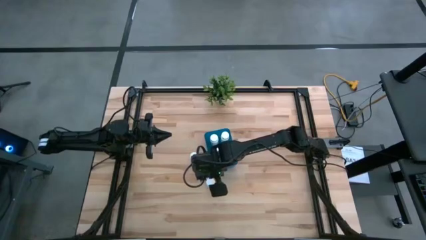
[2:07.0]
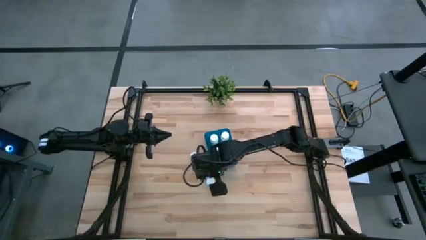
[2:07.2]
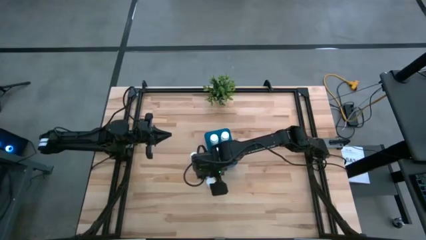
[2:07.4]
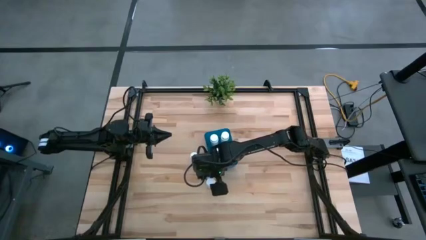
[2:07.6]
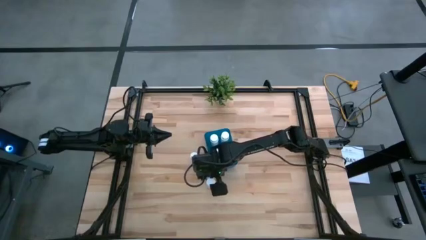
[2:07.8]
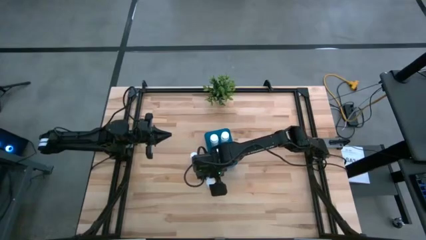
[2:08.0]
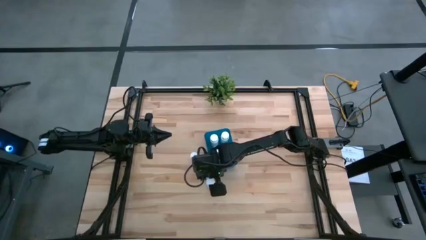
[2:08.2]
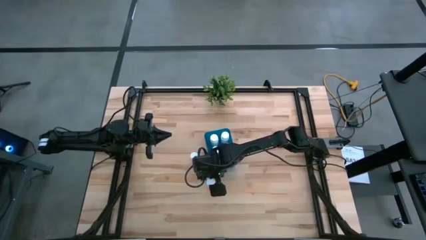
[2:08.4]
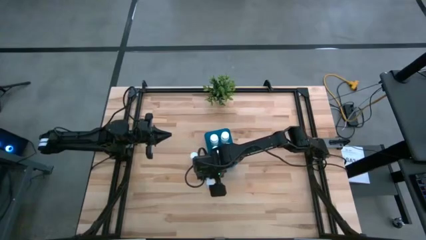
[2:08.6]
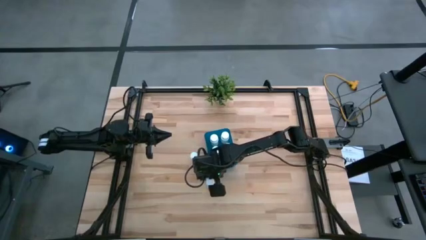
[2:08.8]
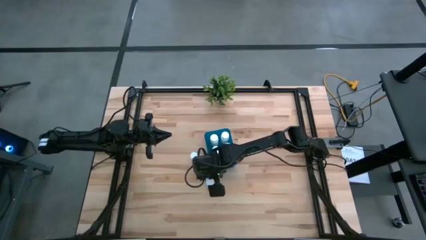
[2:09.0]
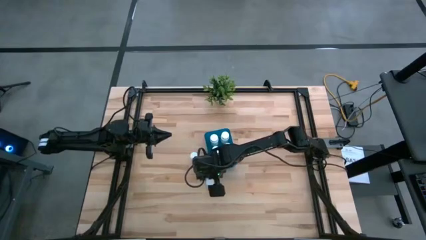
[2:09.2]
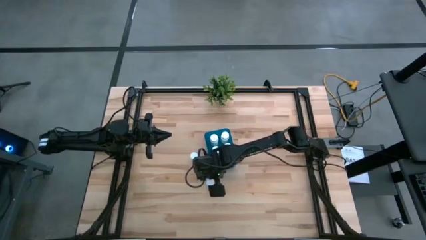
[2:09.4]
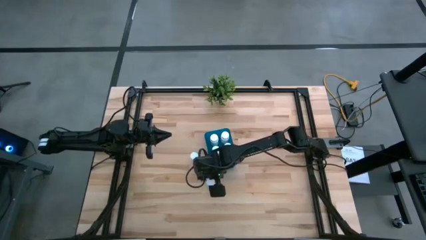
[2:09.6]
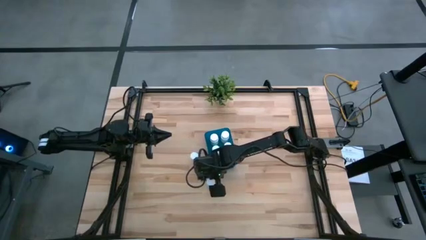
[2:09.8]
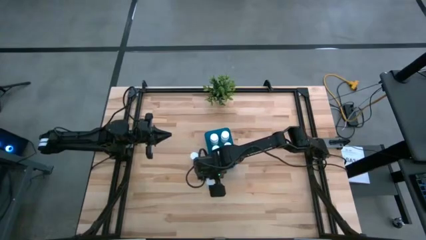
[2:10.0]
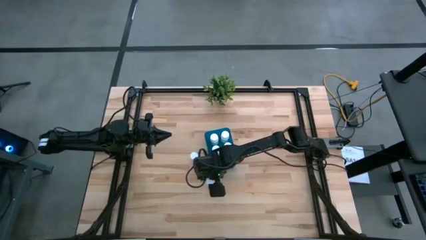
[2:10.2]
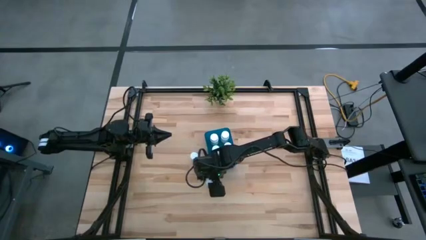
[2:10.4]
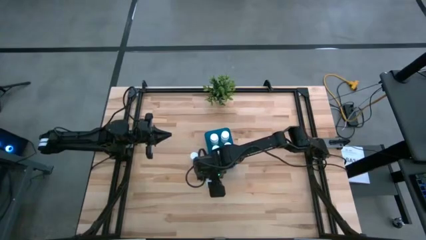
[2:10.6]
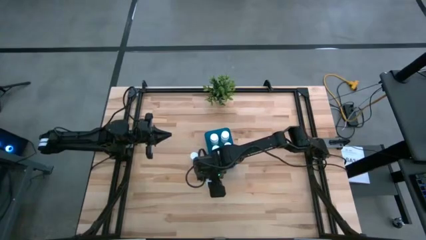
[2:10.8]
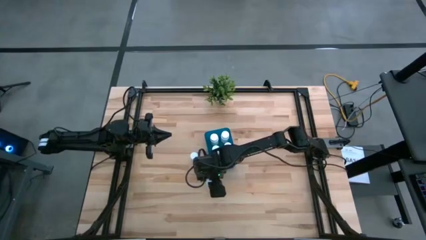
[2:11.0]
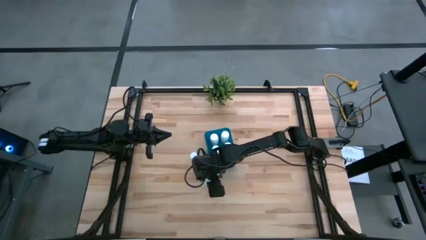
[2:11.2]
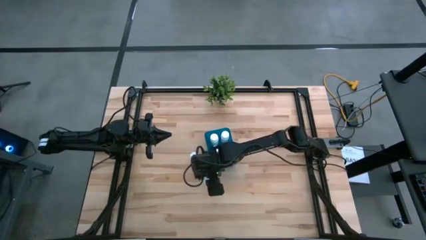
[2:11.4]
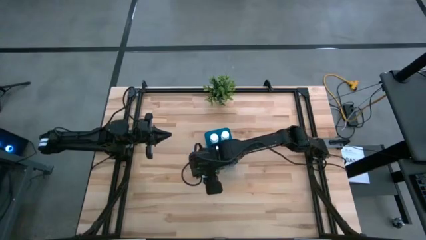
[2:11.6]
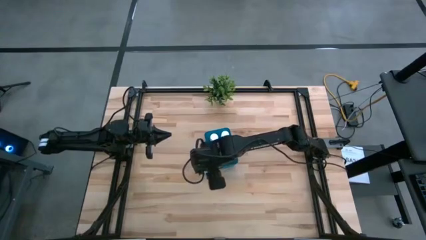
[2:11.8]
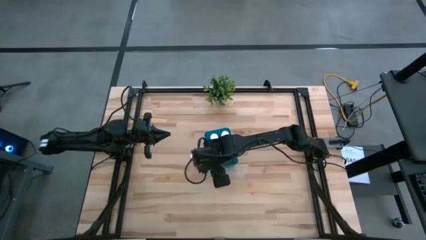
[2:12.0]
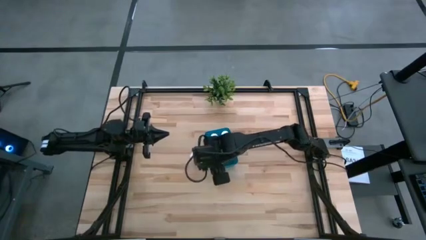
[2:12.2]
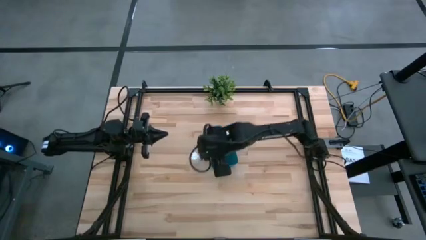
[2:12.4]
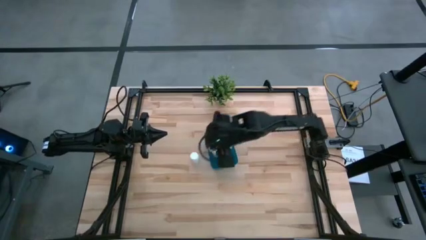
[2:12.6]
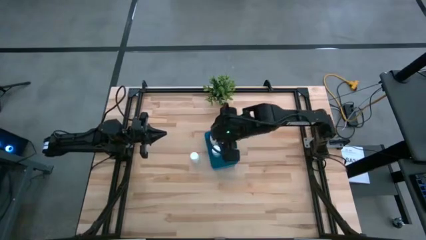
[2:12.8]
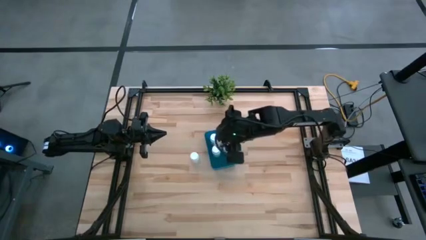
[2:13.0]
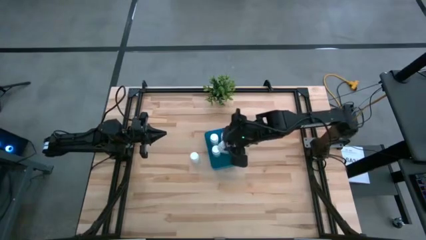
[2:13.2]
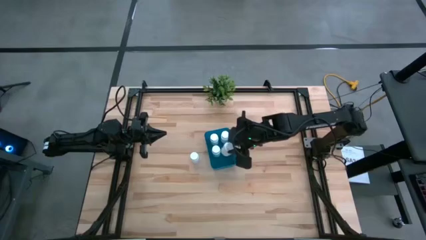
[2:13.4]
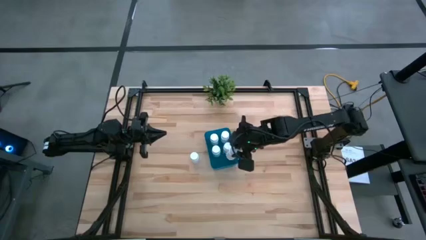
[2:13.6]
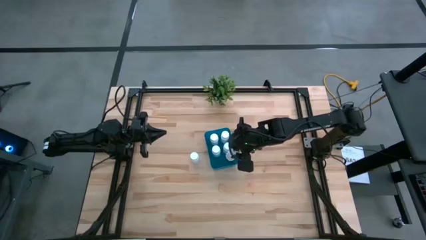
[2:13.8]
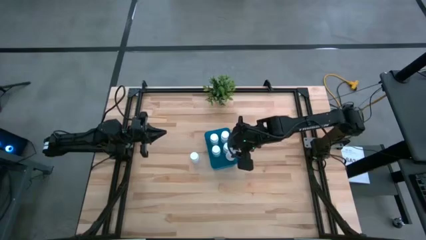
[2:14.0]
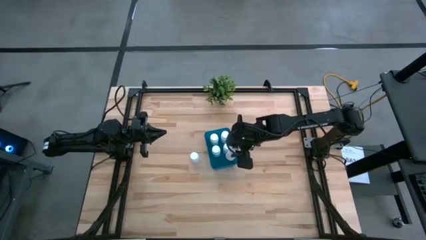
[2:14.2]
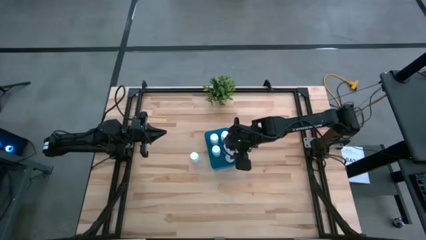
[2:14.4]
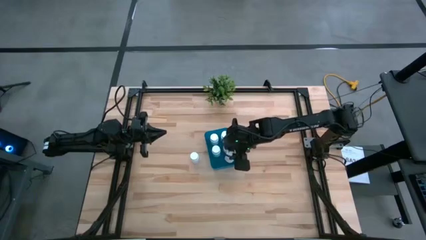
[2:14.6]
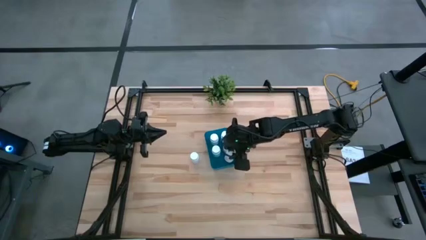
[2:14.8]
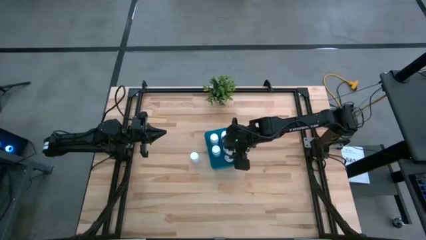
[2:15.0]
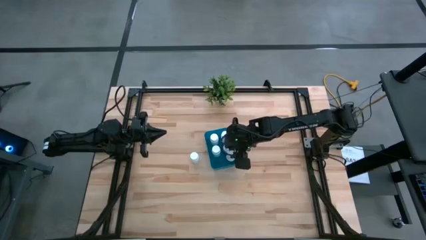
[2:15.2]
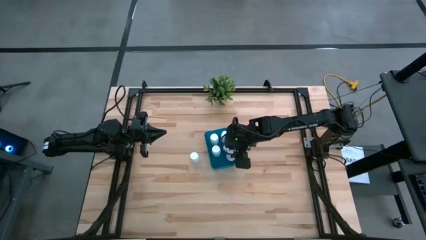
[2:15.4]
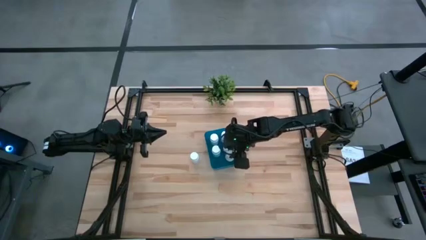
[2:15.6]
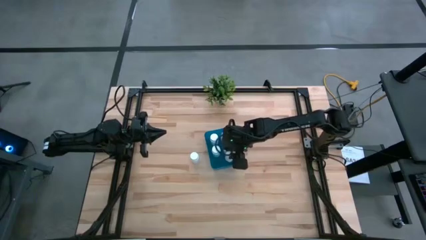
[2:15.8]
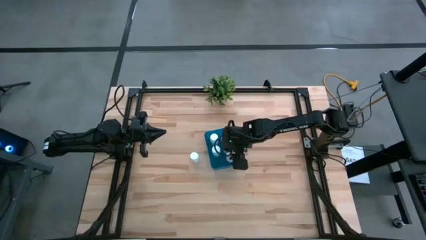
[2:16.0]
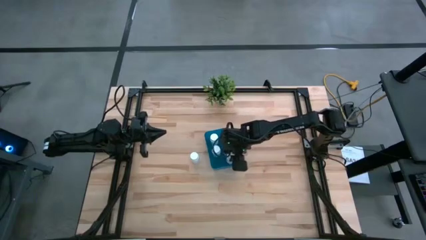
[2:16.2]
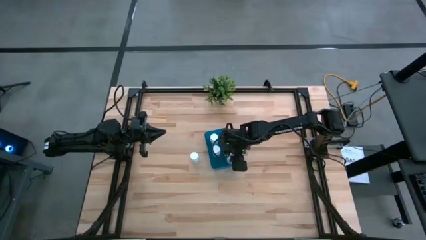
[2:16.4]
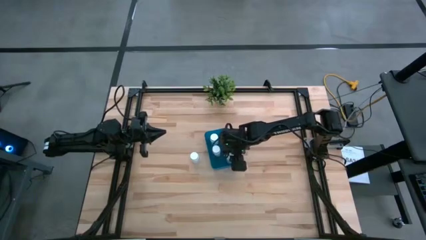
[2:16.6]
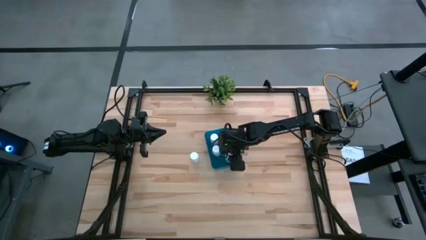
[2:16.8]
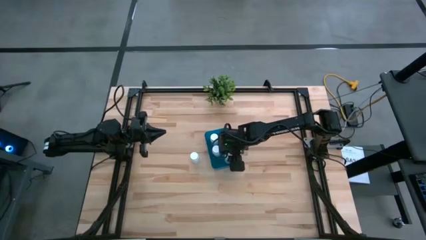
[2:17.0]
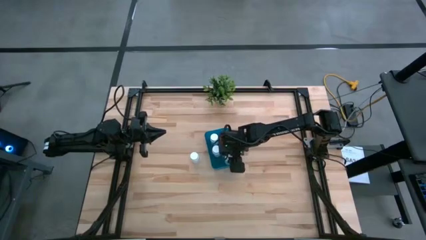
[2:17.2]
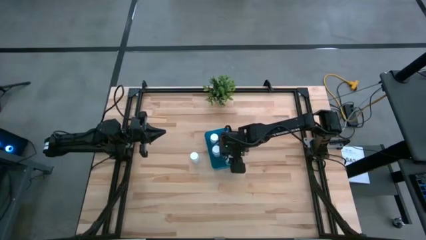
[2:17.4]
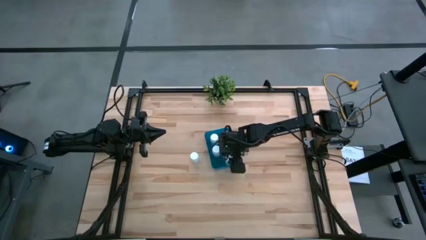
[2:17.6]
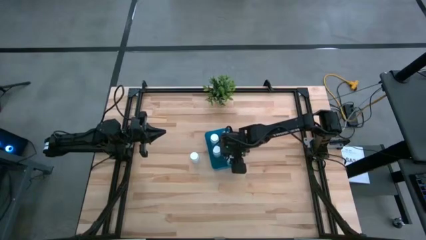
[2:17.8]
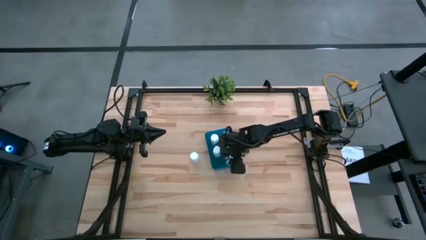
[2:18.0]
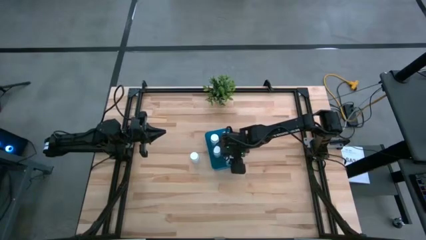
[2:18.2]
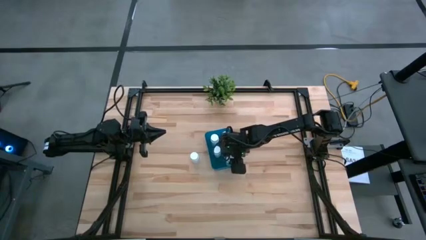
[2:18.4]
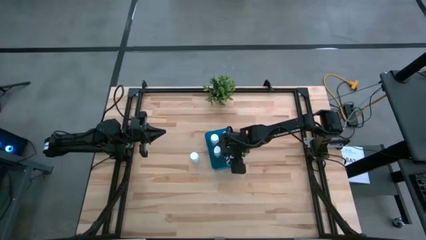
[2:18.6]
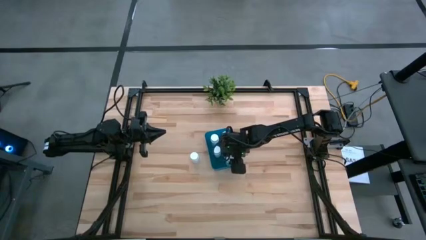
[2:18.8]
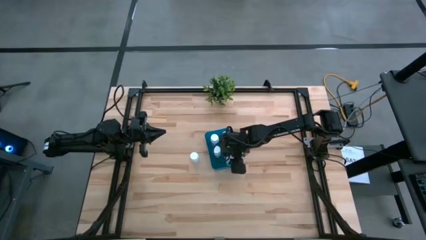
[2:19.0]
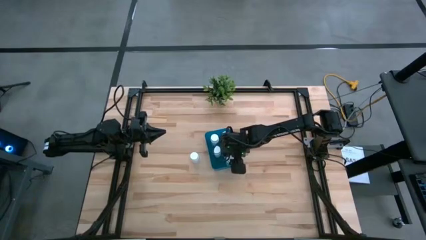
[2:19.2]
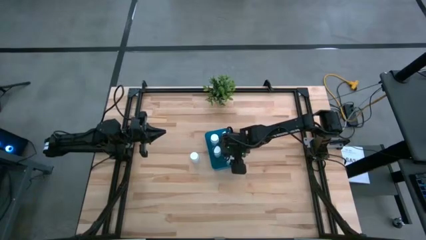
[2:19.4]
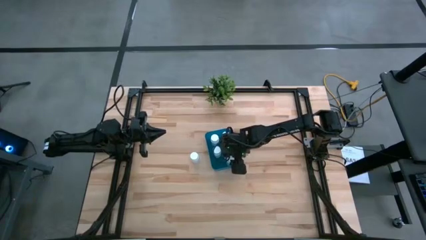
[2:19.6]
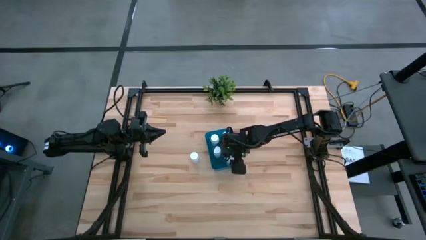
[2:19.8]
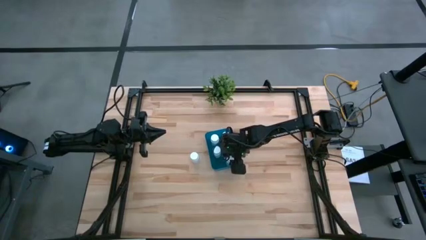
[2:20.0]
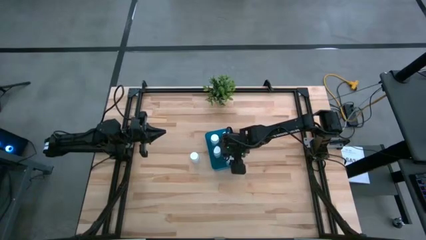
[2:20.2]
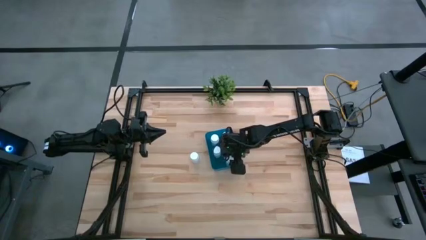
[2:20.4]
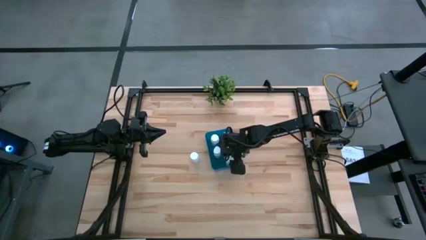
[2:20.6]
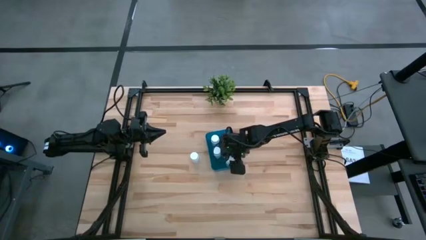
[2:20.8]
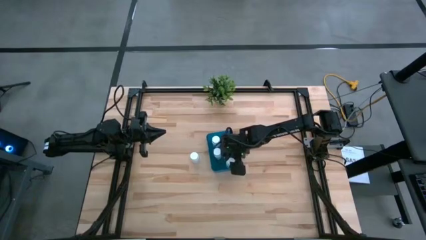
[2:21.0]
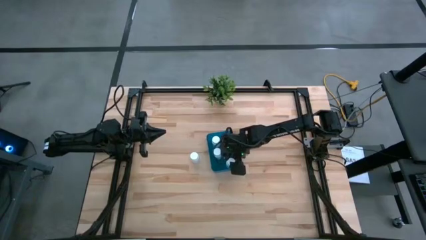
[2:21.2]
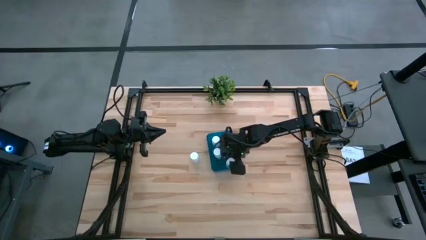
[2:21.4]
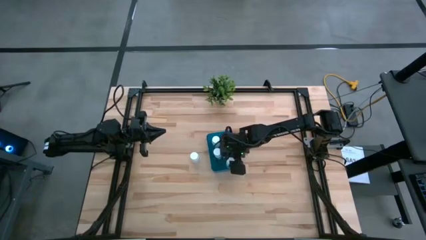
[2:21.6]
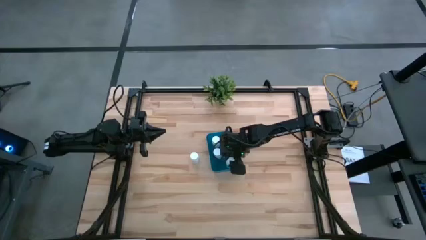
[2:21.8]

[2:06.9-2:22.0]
Task: Pick and place pill bottles into a basket
Put the bottom white medicine bottle into the blue bin
